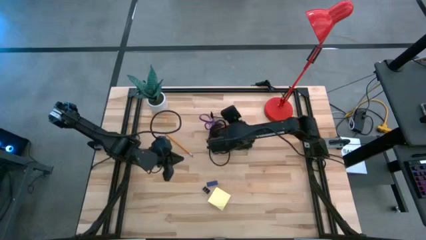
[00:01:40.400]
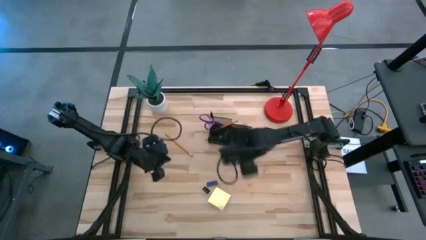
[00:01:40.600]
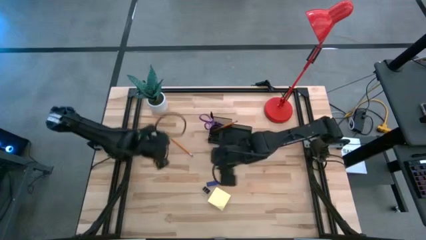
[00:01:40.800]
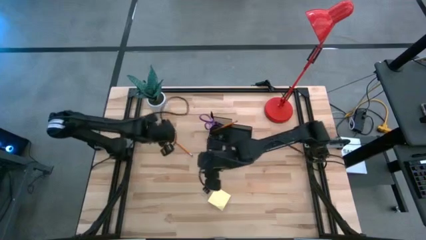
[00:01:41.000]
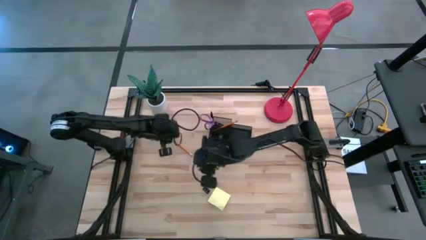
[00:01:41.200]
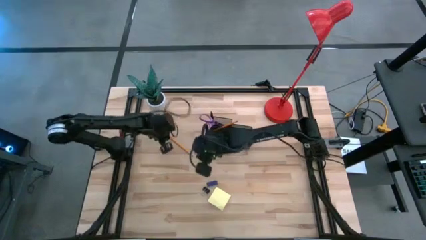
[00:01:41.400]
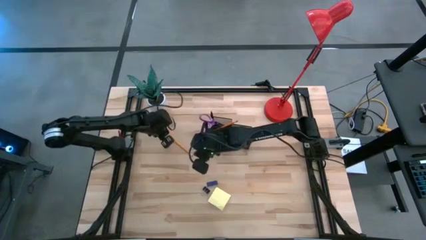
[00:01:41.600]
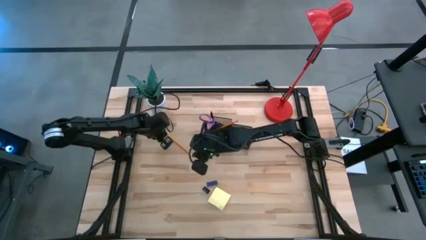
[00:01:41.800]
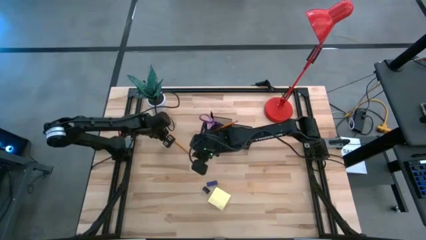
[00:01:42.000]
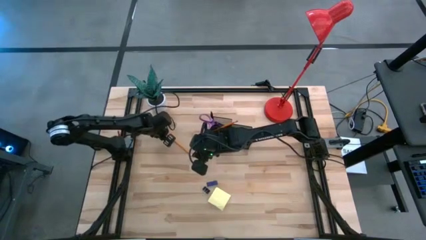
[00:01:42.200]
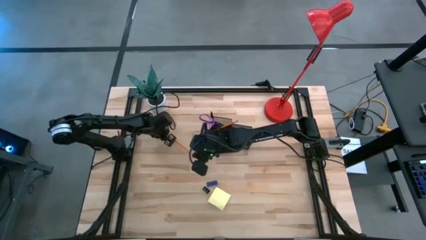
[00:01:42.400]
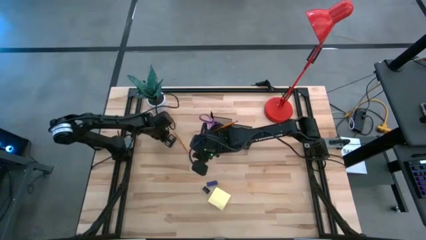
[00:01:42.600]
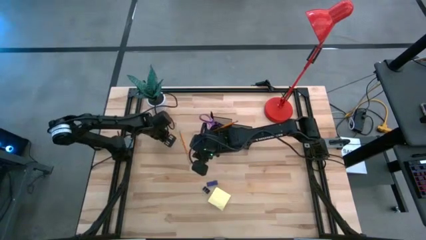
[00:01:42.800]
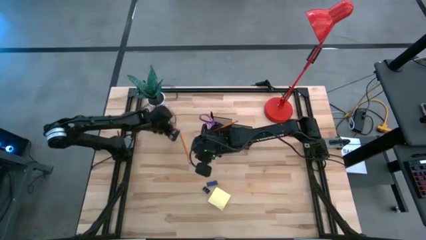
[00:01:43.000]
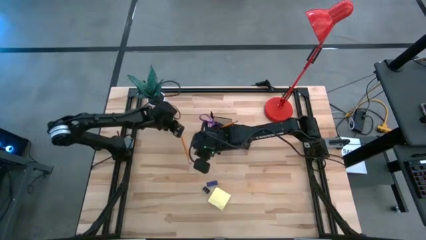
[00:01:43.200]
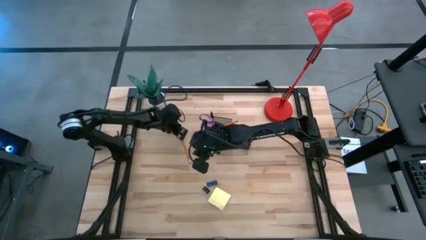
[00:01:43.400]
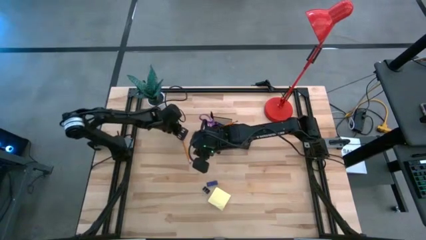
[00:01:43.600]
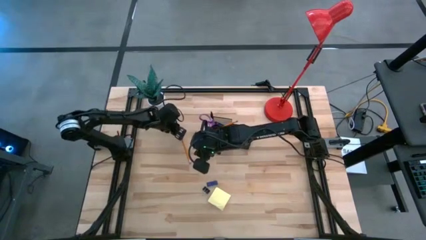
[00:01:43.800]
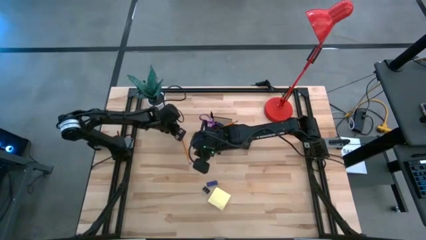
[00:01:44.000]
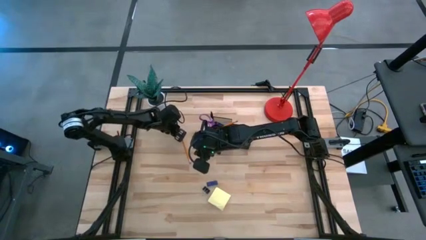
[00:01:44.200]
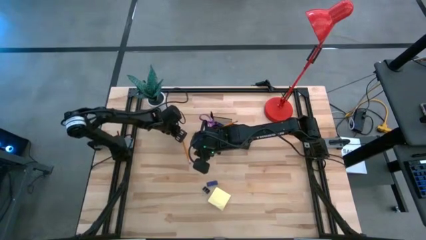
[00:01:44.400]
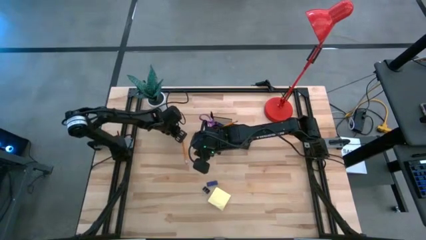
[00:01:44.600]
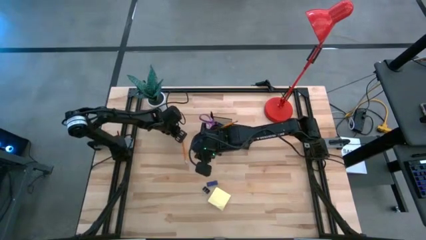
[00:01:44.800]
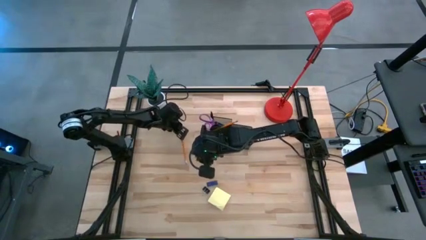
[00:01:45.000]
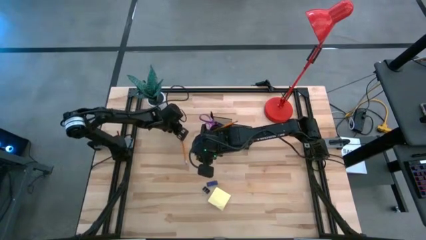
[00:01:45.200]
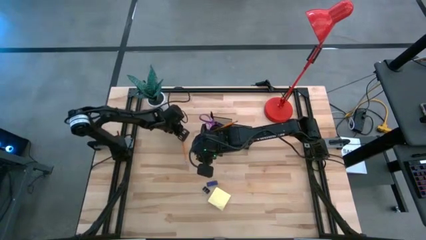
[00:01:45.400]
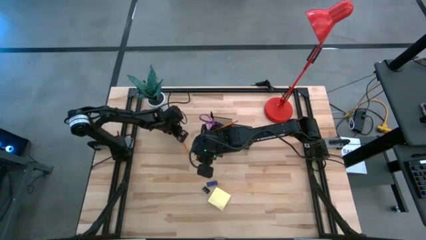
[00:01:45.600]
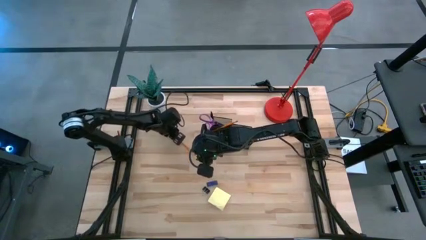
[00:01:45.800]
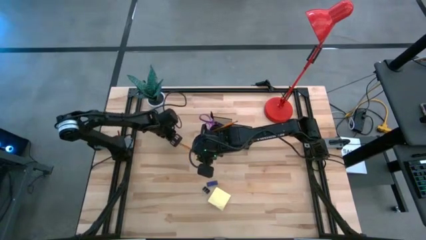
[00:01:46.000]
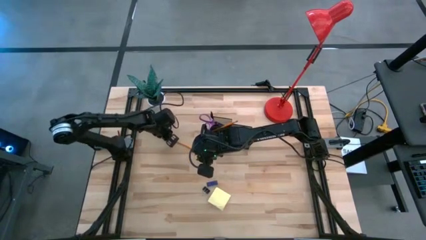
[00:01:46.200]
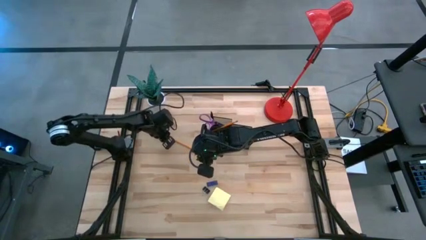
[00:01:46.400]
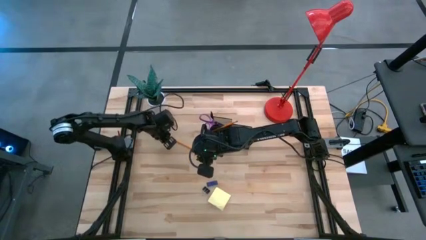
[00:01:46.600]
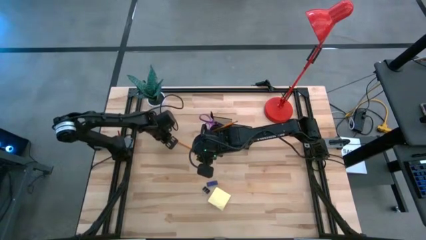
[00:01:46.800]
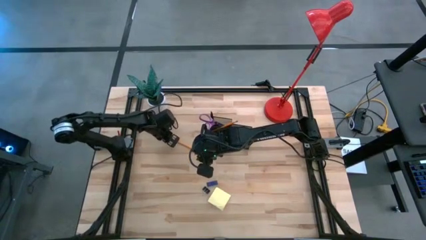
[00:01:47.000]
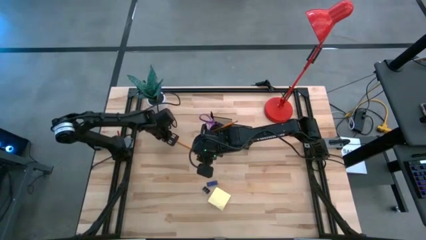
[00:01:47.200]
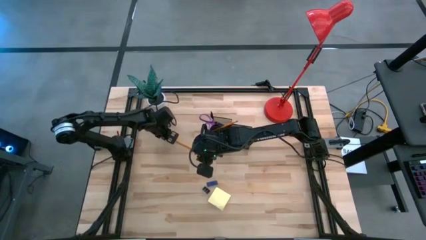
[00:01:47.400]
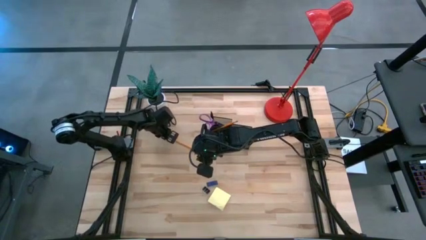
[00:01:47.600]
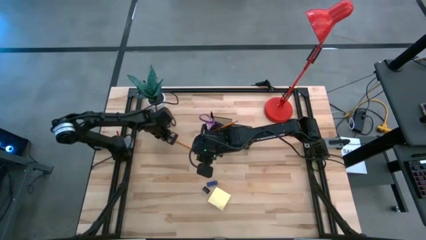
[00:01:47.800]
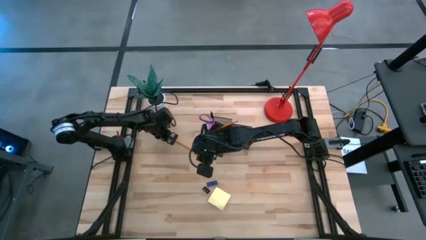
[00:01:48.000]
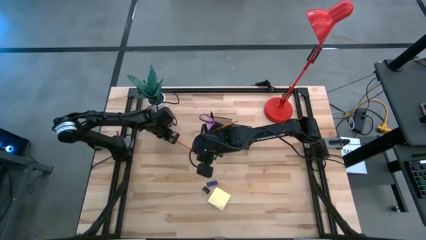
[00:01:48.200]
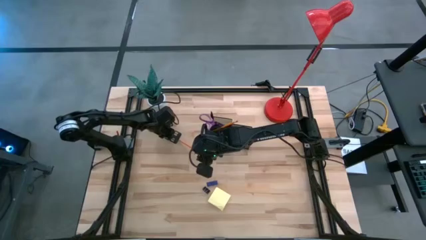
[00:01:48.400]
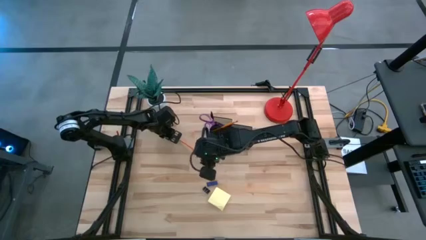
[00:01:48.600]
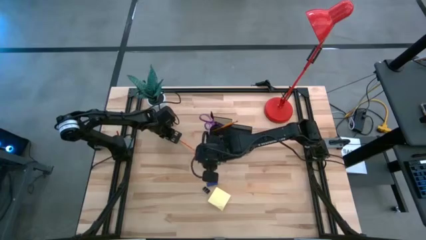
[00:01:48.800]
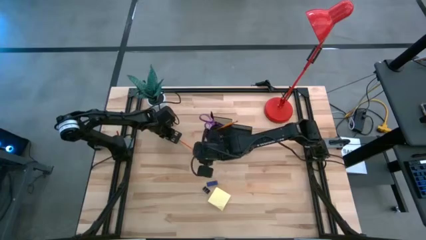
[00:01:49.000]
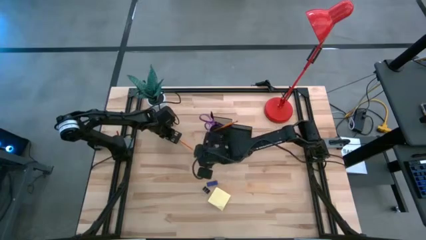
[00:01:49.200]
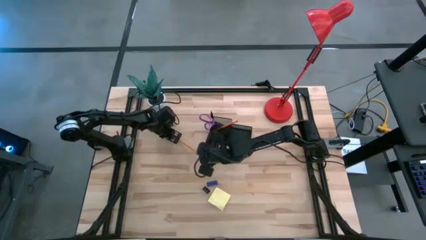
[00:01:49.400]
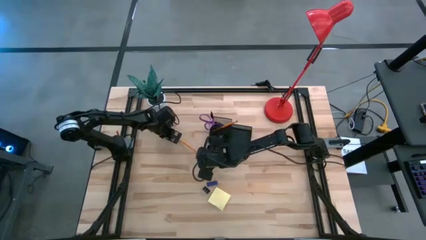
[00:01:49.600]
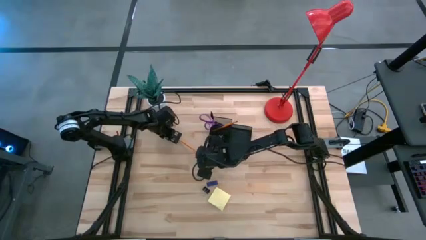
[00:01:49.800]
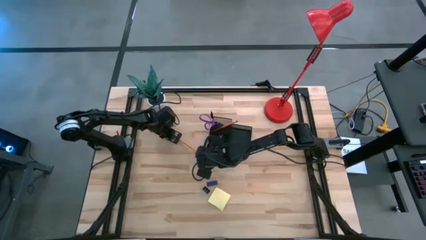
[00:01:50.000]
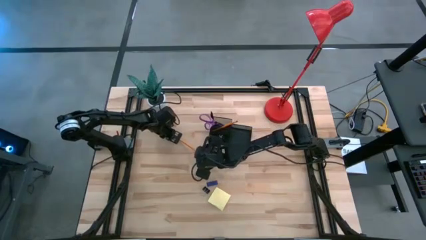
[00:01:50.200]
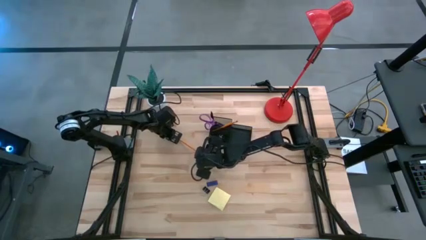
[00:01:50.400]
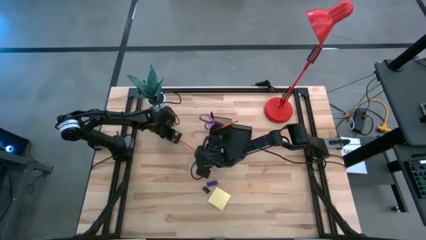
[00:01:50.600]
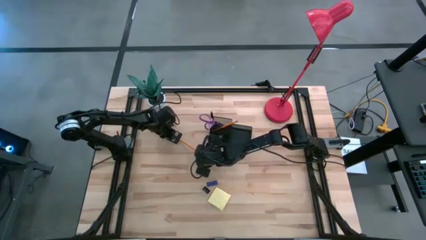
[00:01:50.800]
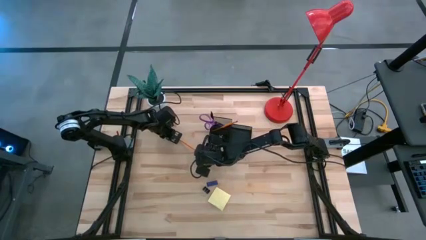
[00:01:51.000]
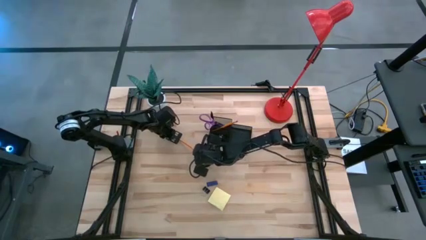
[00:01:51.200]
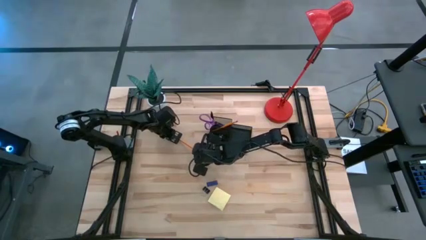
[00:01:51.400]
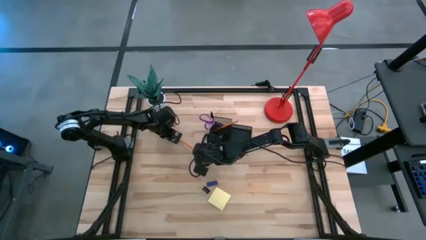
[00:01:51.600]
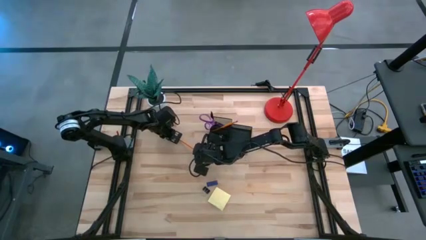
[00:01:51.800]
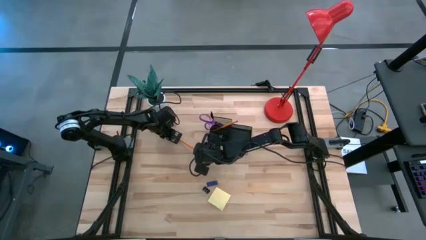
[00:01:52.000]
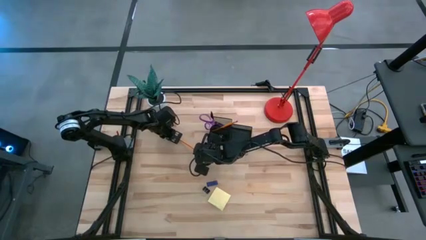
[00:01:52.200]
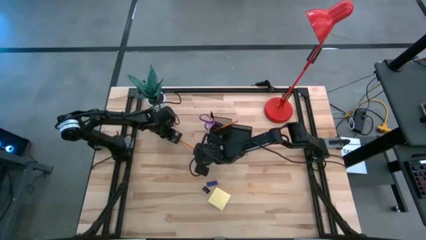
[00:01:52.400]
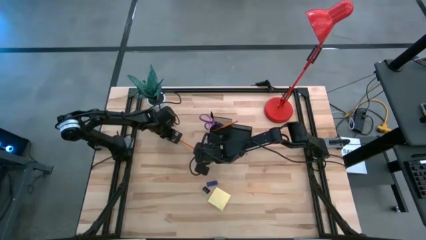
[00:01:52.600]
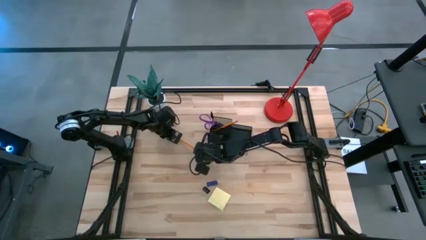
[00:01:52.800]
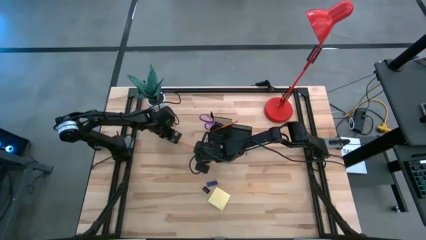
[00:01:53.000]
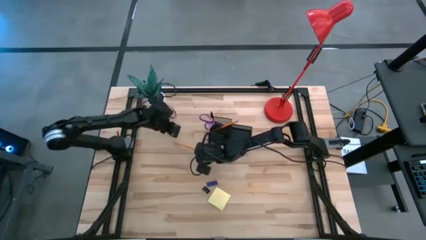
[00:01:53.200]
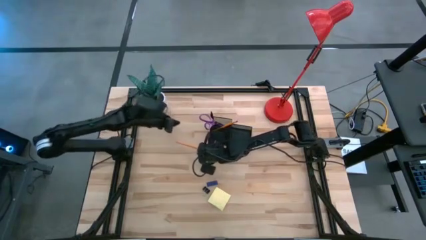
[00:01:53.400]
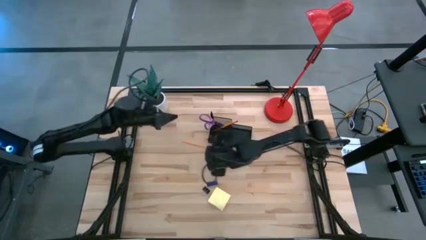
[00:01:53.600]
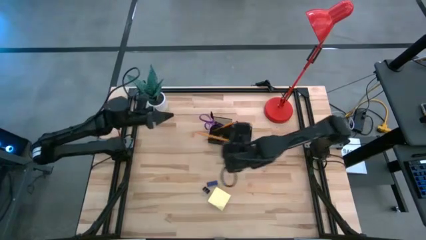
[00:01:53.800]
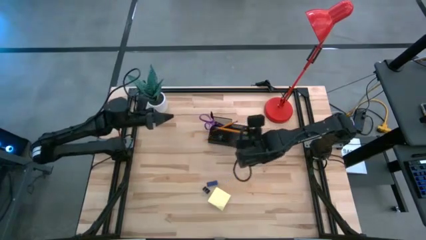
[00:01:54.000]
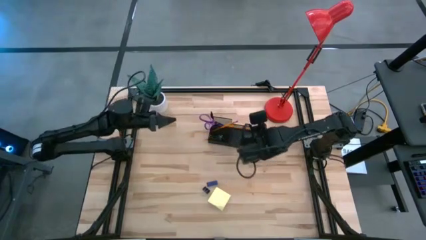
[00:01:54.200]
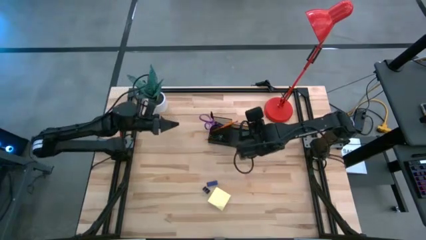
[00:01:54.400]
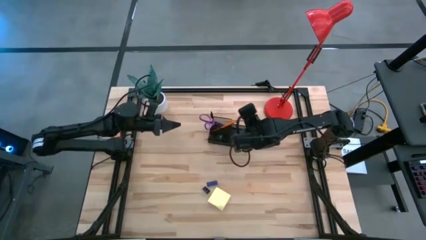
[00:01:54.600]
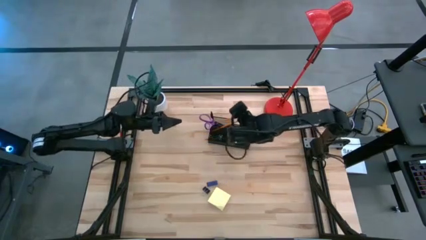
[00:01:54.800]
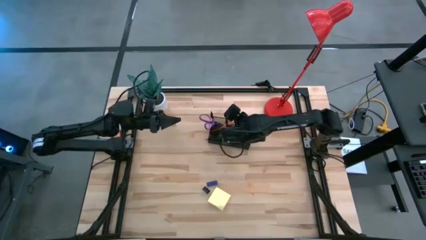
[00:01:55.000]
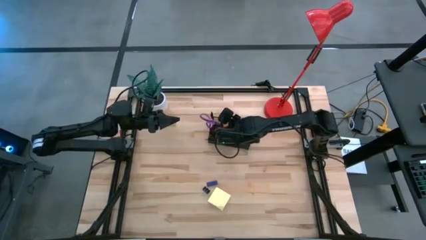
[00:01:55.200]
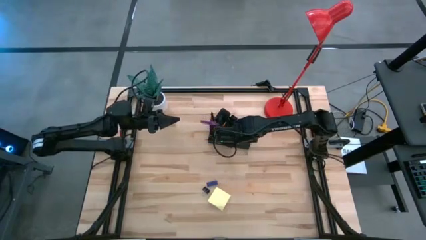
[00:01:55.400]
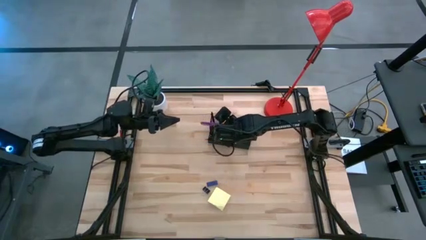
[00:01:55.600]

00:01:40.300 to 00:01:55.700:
Task: Pick and place office supplies into organizer
Put the orange pencil into the black desk organizer
